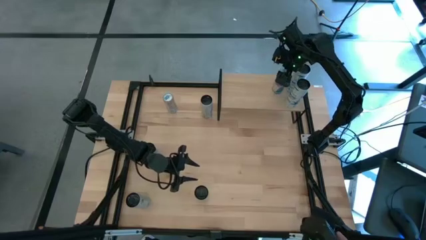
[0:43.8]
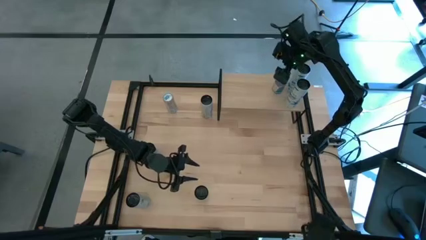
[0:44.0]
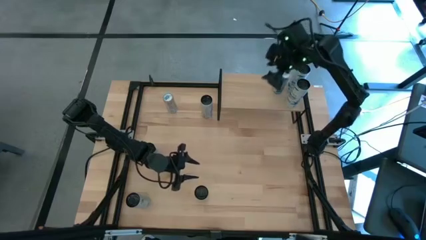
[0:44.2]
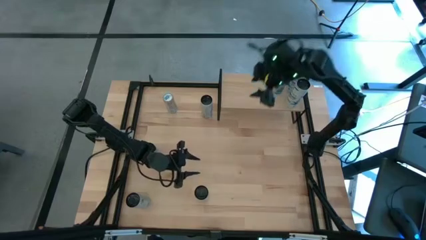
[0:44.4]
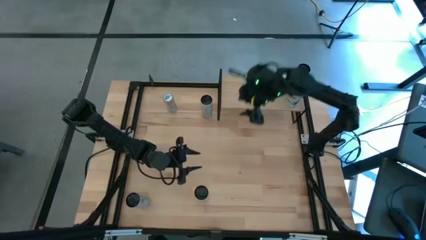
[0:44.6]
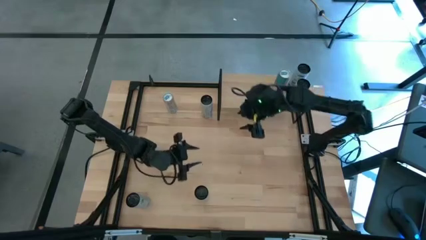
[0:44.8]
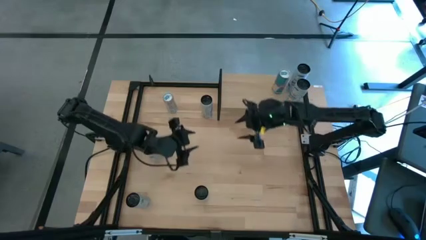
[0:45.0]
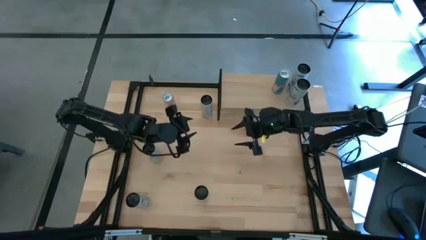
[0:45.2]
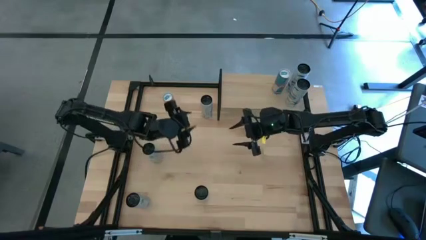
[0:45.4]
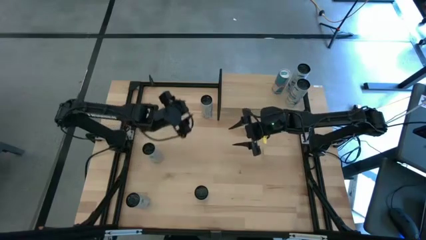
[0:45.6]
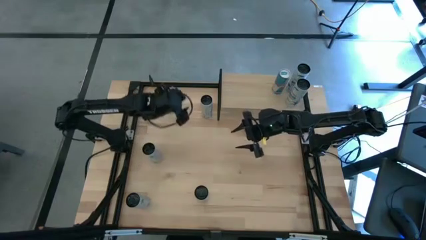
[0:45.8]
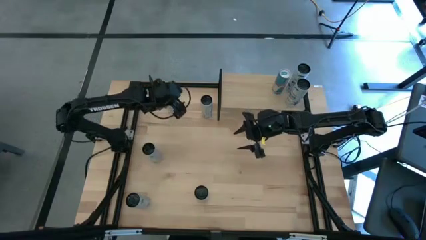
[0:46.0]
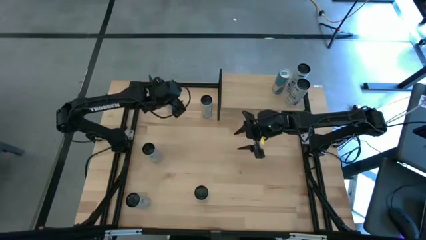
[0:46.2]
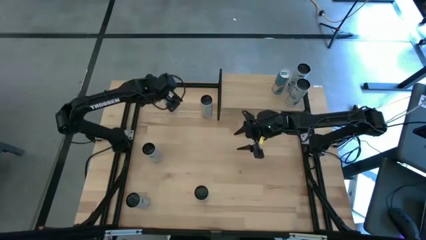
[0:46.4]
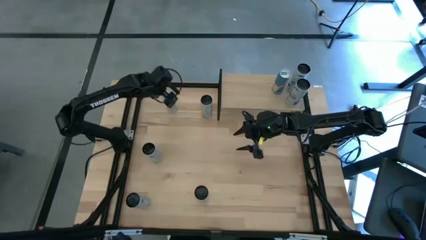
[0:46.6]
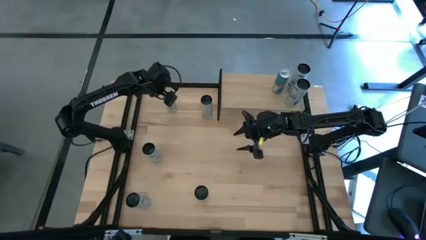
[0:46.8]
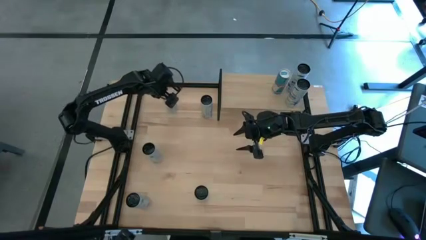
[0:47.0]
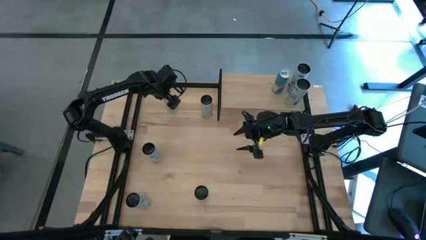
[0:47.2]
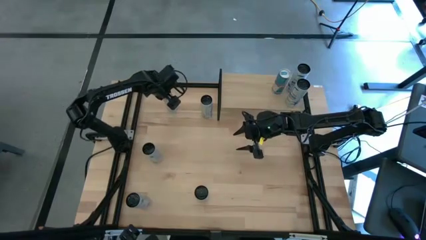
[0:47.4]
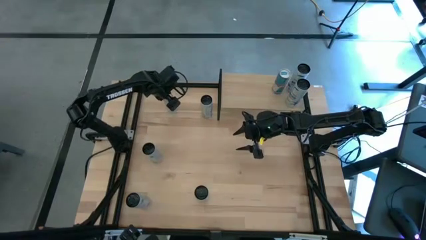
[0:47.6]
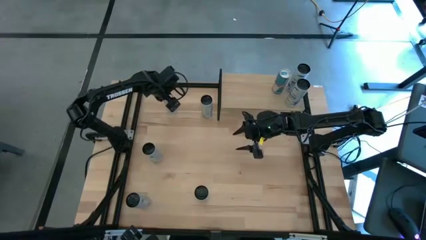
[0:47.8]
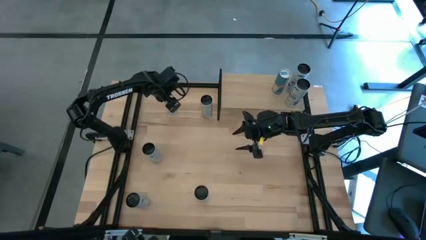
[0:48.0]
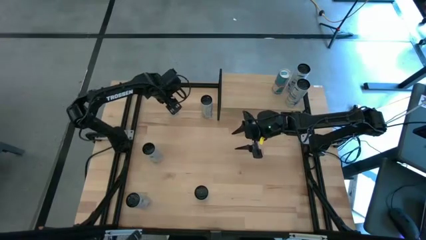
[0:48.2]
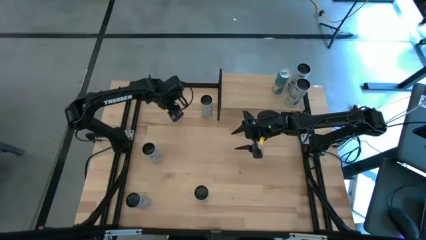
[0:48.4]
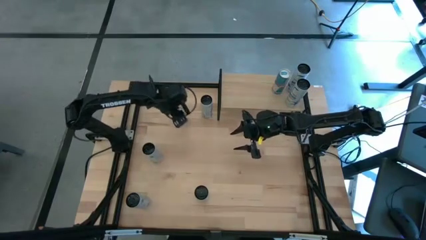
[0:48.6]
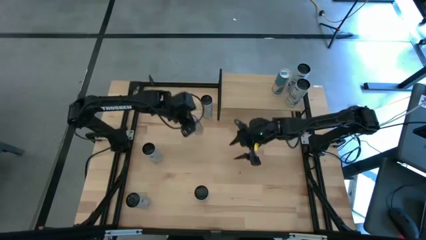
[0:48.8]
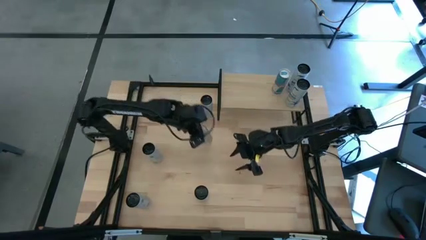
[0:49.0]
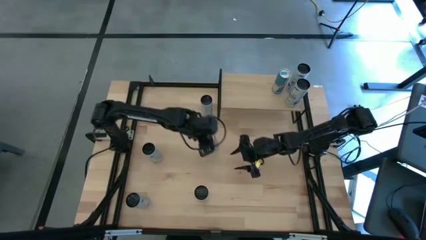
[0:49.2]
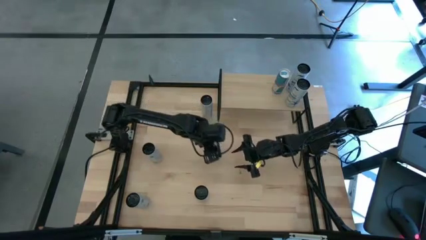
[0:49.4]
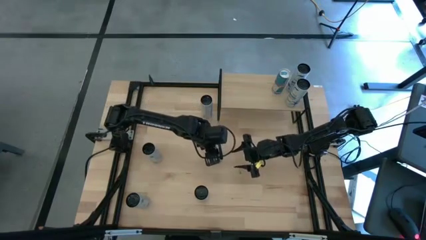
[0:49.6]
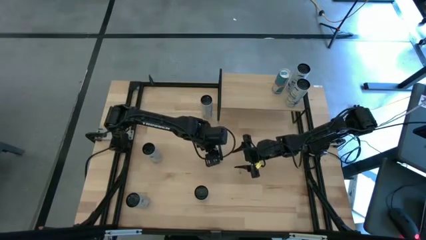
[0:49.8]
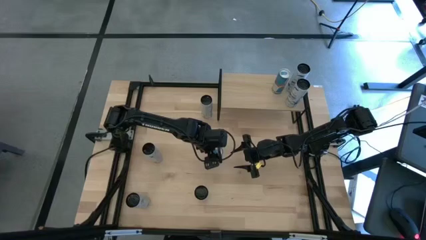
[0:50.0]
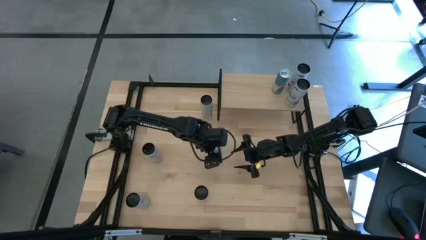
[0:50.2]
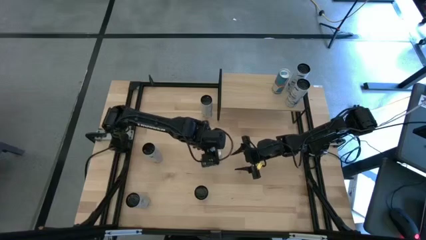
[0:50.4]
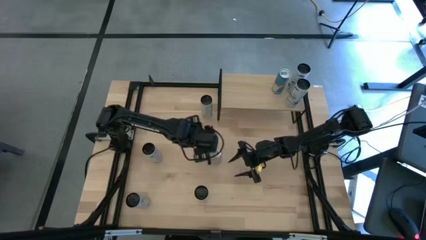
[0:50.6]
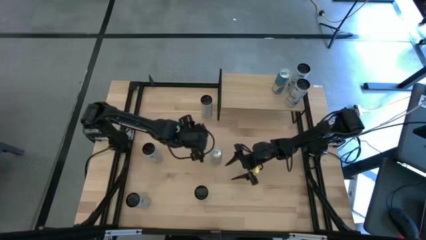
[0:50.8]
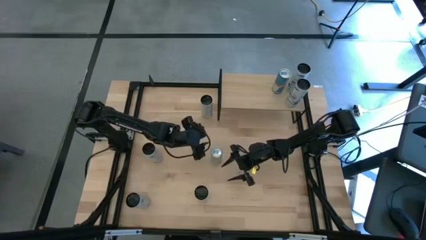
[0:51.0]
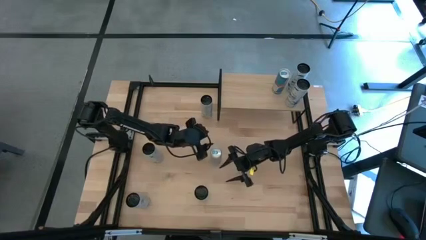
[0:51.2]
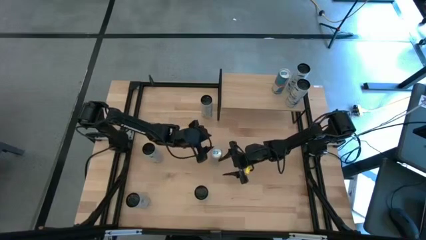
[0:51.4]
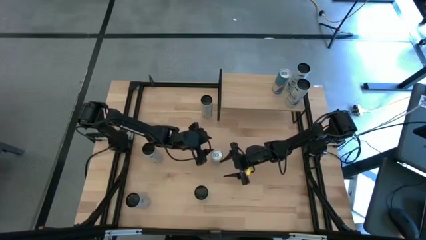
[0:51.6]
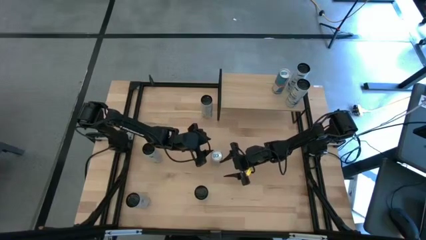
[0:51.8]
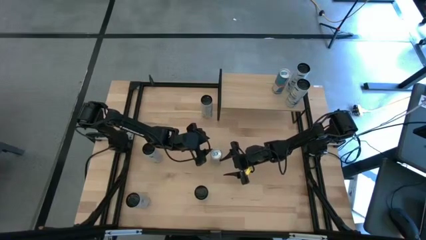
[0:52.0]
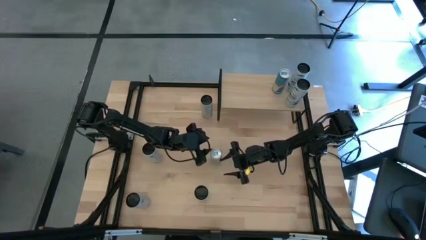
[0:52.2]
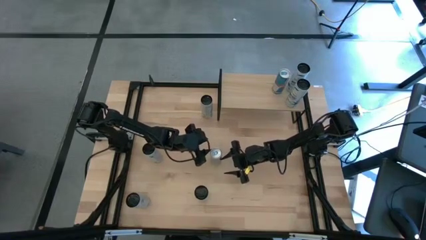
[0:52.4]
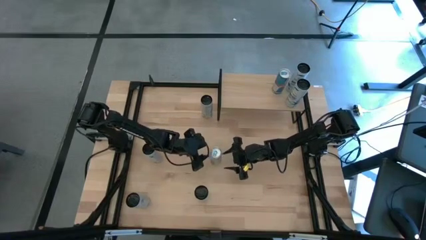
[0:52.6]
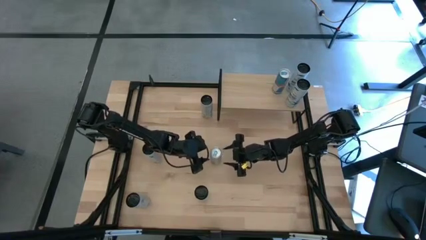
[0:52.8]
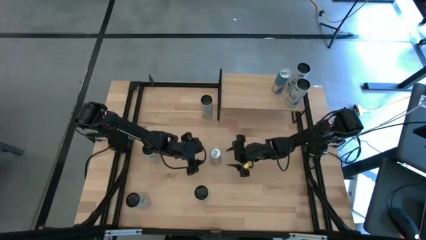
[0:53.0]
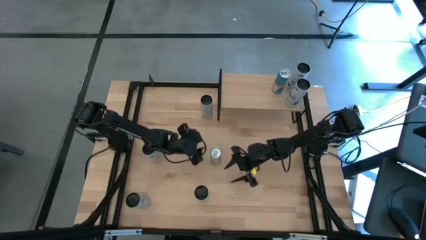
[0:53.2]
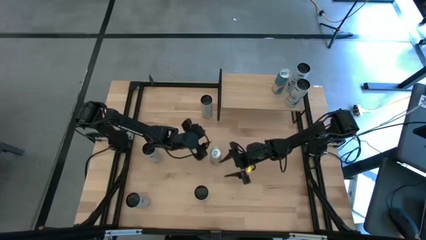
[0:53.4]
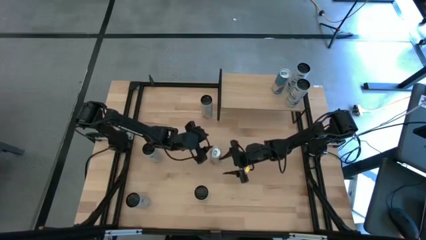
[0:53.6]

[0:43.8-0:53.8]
Task: Place canned beverage on shelf
Put the blue soda can on the shelf aligned with the other blue soda can
